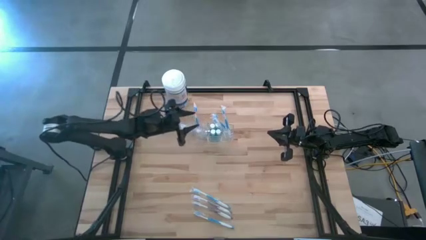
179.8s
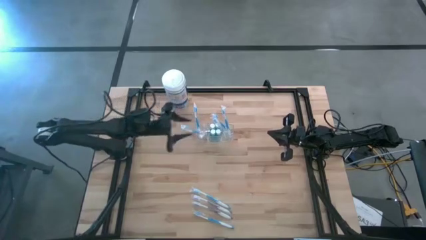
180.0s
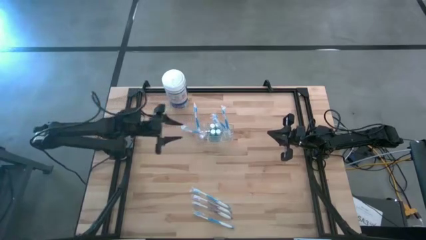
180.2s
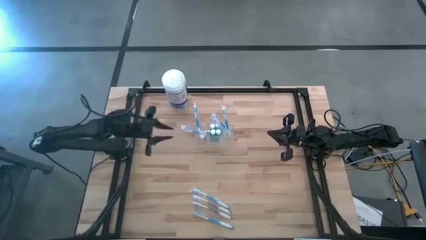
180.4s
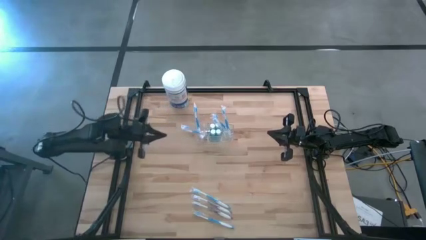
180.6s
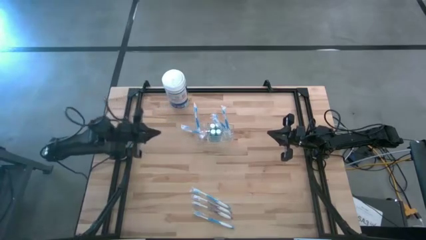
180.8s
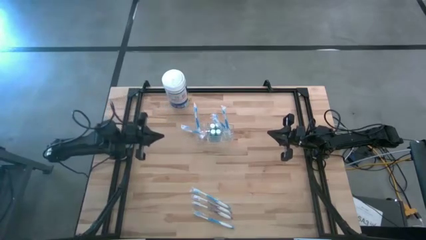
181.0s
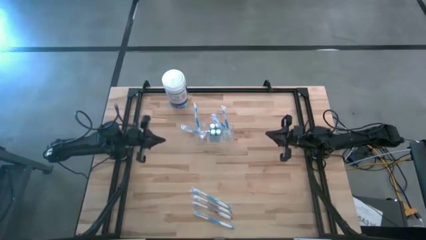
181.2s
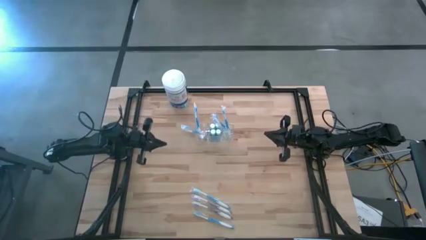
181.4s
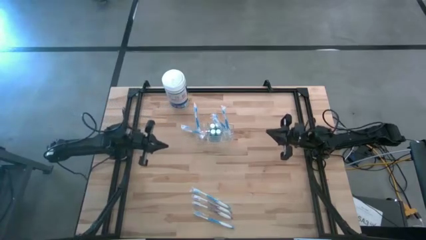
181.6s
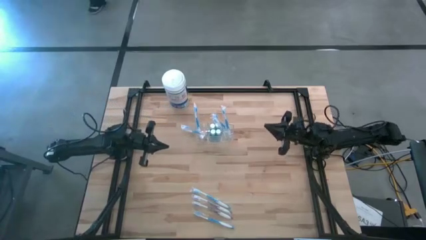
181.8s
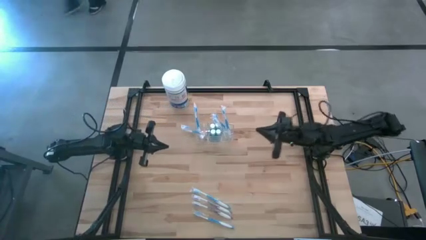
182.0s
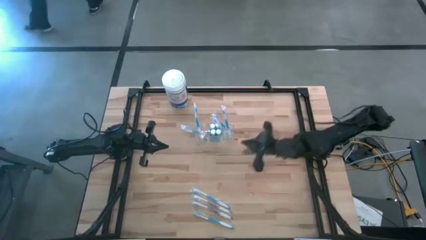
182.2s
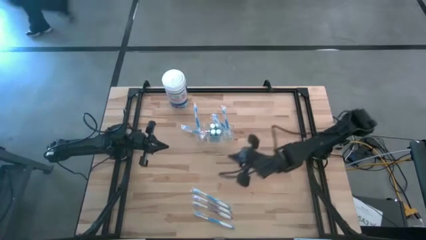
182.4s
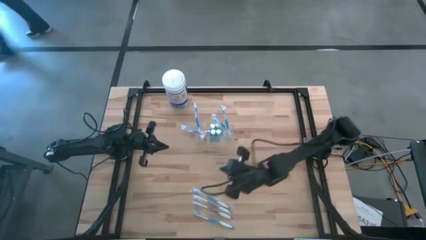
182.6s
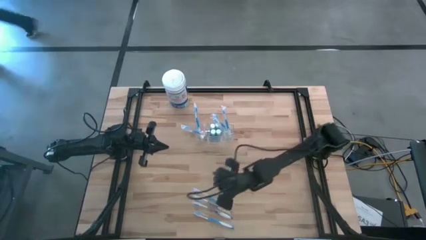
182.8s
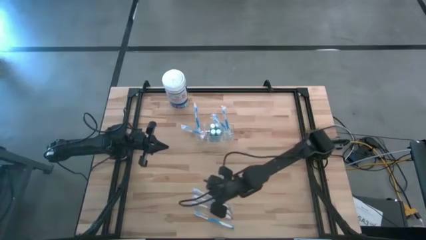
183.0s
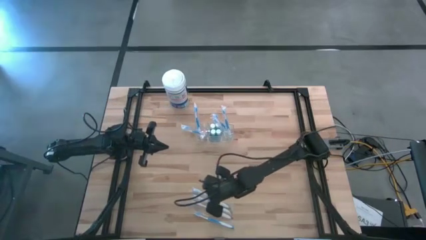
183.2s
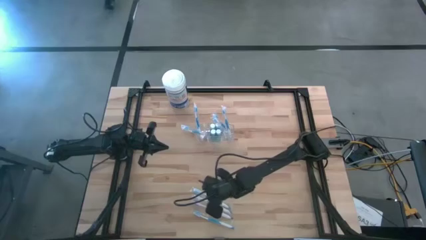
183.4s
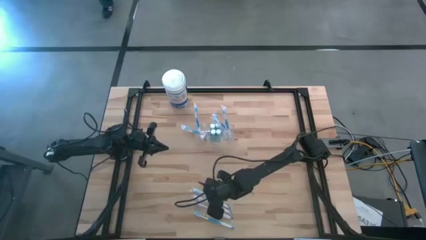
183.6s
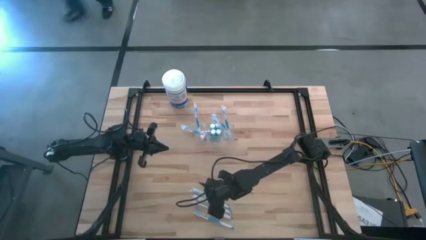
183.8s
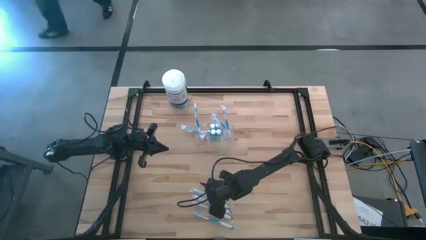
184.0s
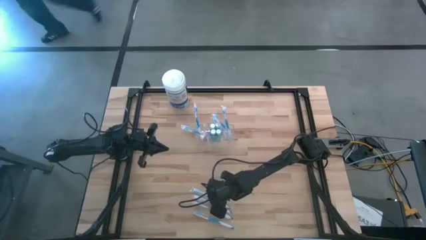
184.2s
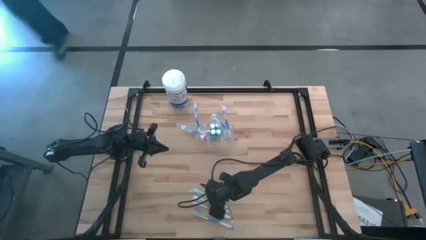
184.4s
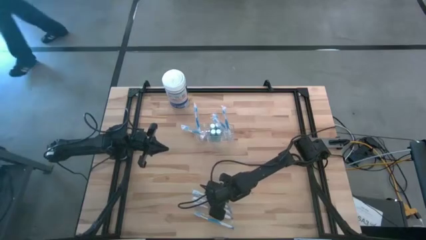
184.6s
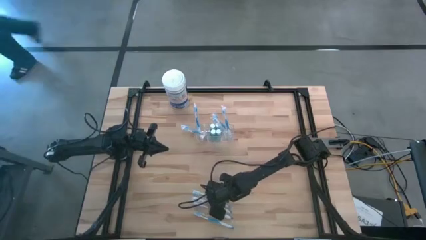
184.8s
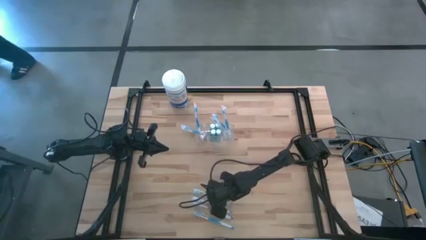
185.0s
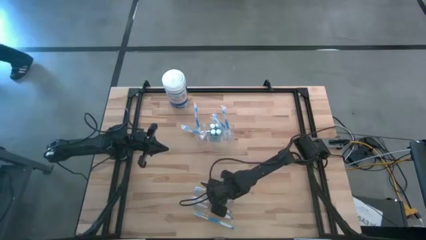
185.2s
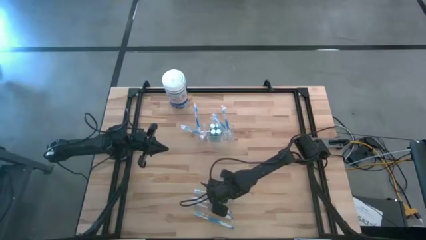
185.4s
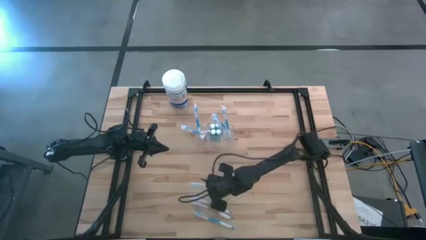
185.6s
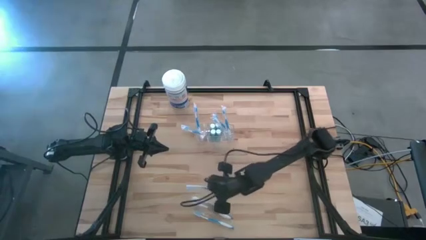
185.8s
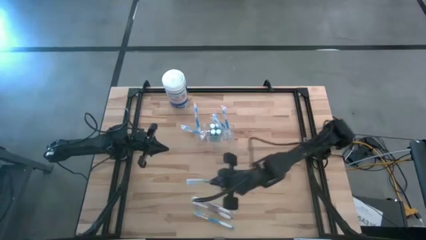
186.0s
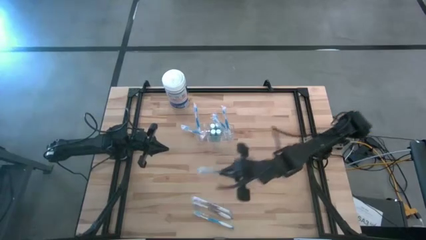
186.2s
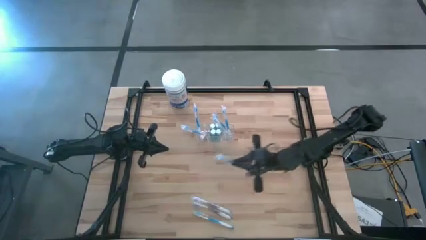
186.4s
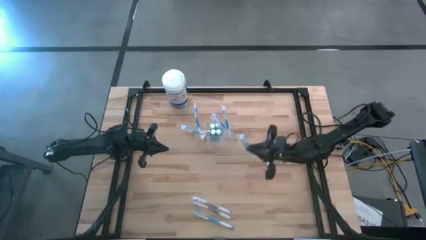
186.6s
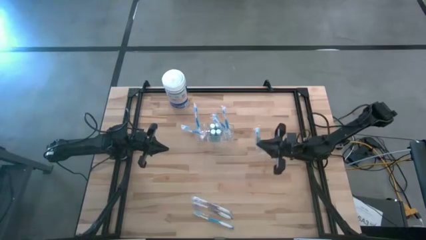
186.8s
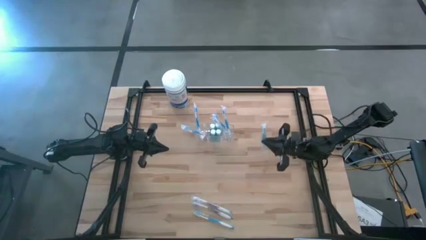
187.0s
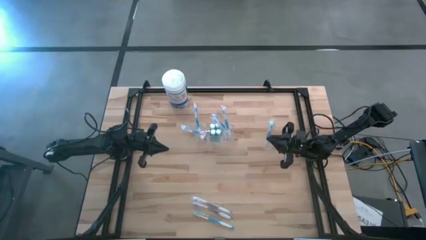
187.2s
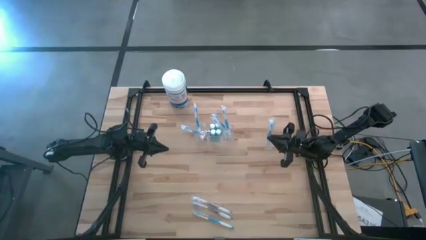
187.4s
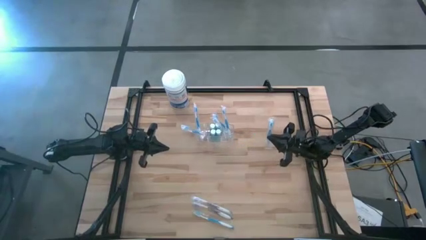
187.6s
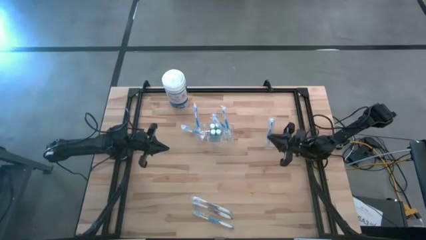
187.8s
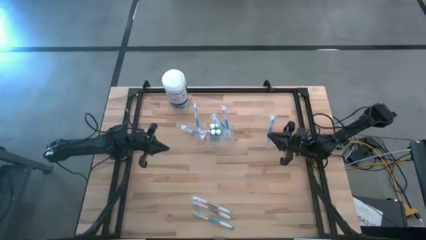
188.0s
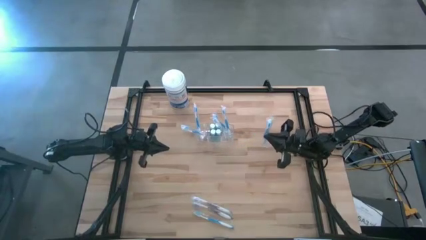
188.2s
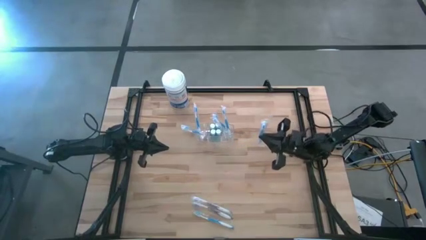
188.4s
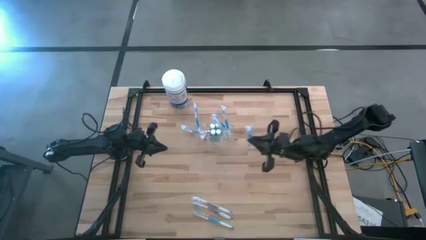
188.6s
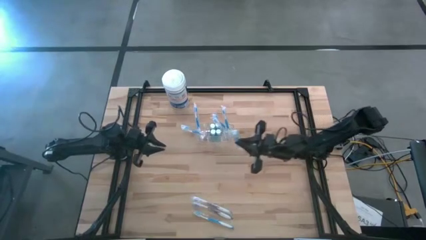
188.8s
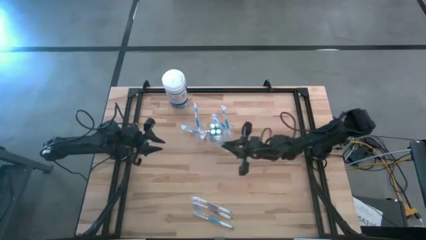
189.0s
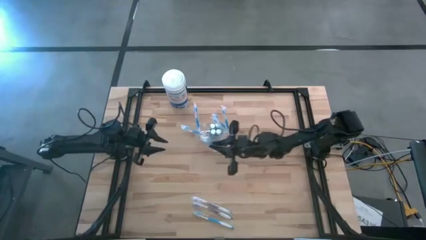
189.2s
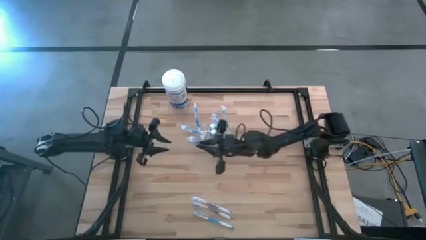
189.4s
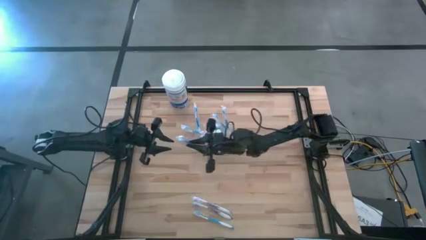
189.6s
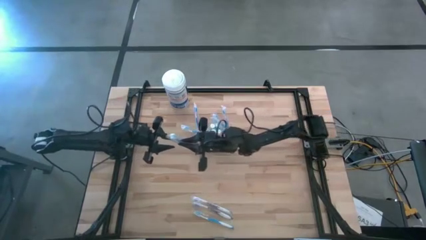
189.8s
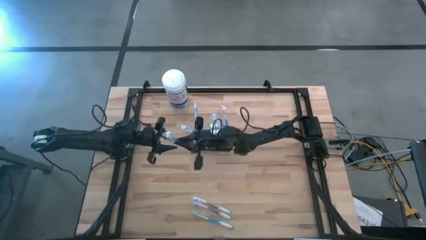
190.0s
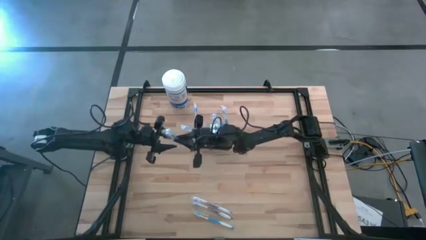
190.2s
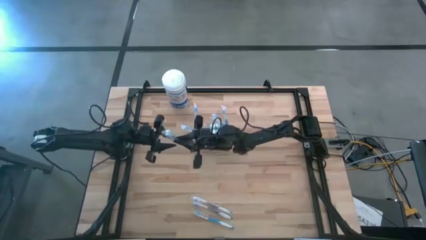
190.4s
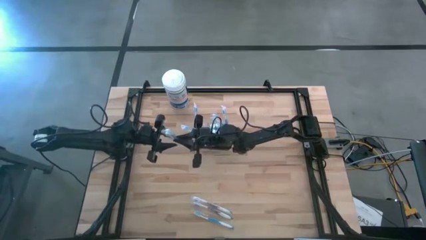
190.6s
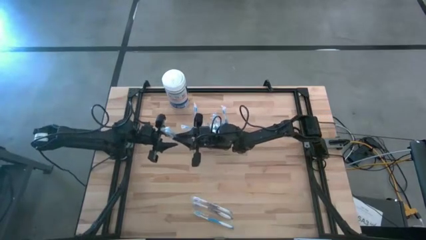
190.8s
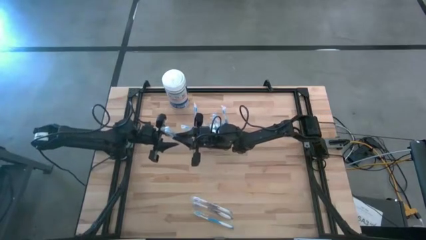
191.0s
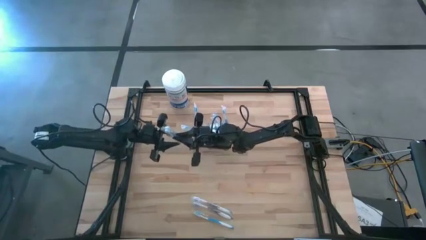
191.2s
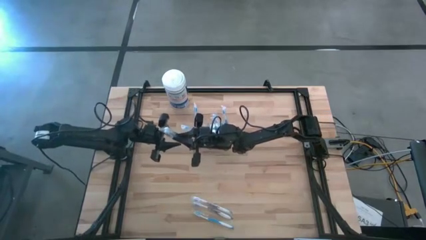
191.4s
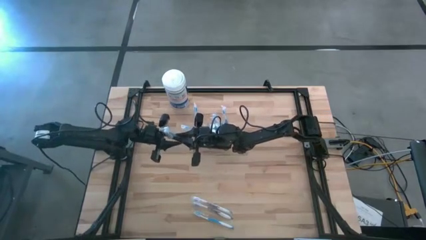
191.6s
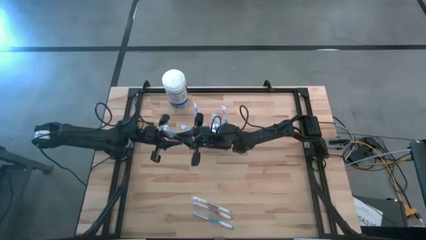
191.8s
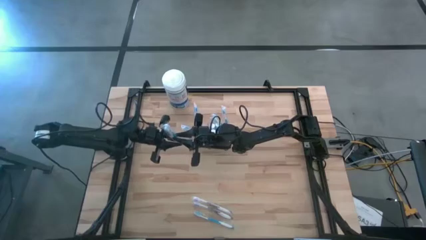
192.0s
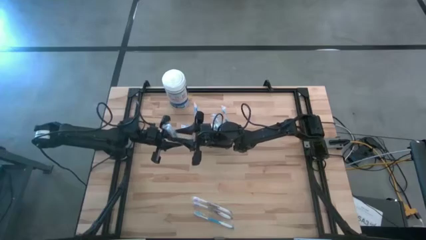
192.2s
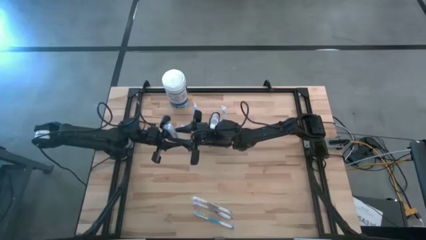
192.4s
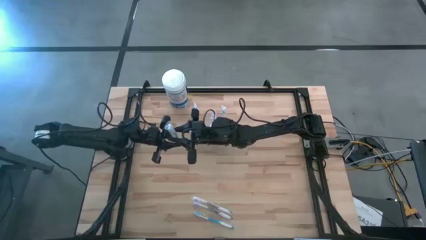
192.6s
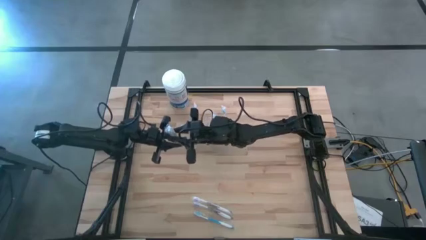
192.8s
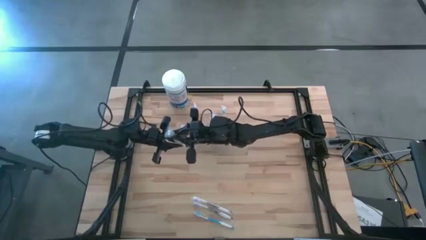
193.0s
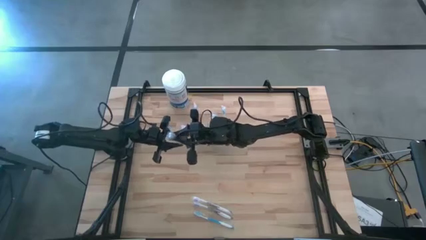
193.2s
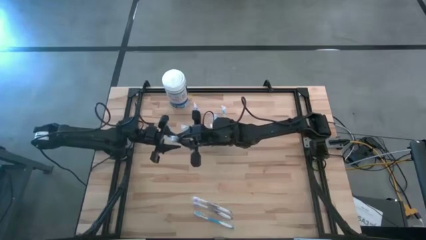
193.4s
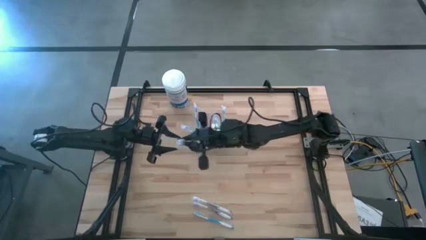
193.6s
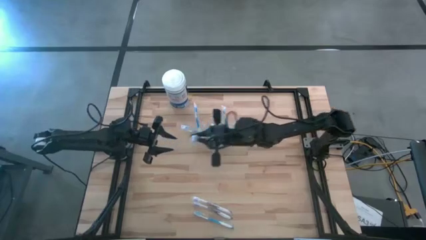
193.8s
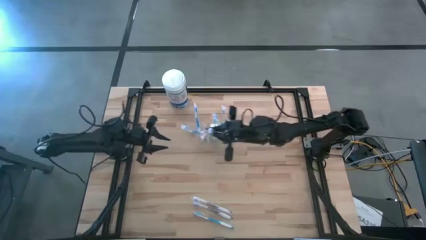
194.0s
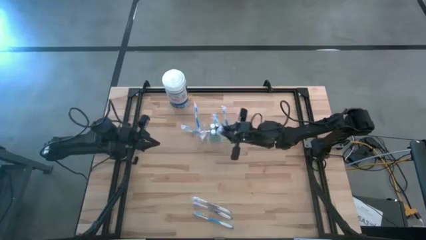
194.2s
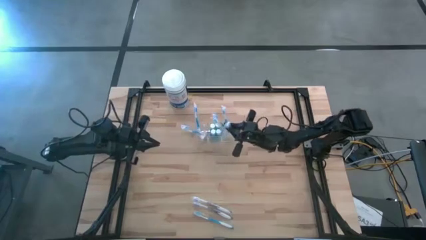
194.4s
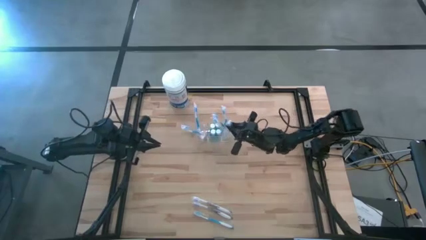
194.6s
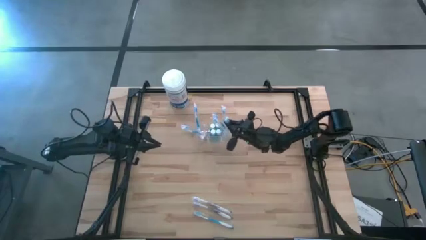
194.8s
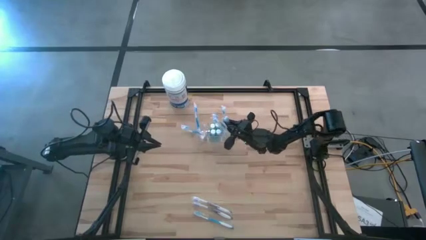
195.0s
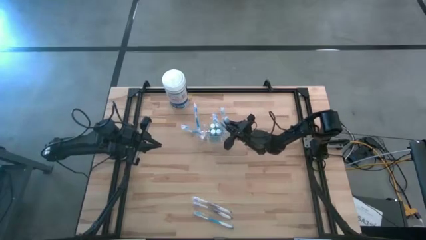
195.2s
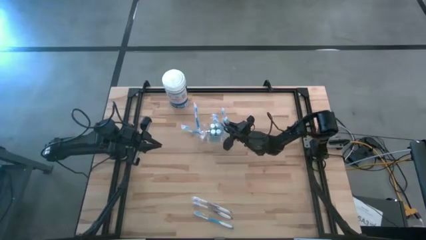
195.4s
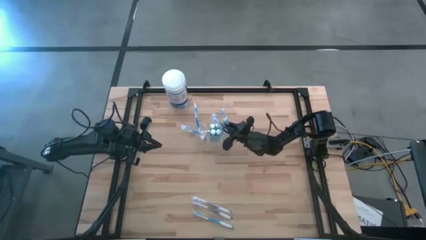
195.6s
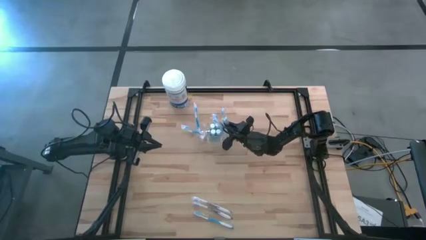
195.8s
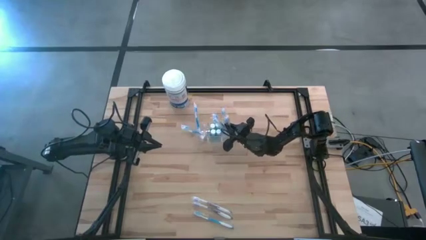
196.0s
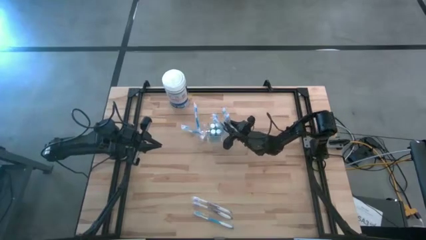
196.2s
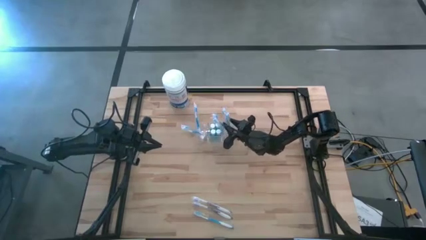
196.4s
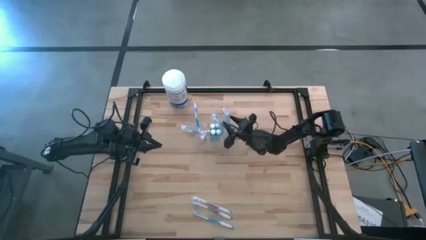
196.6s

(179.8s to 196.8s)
Task: Pick & Place toothbrushing station
Put the blue toothbrush in the transparent organizer
